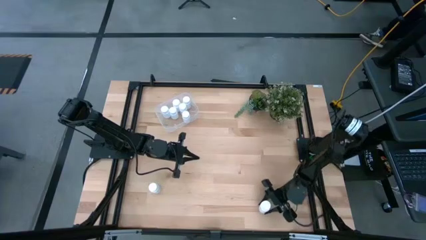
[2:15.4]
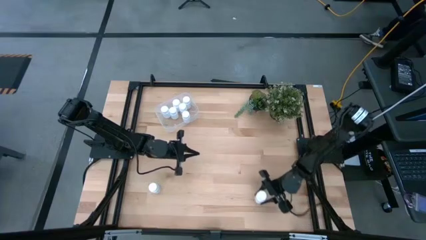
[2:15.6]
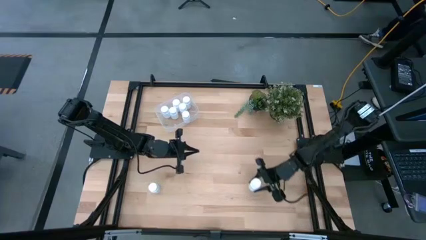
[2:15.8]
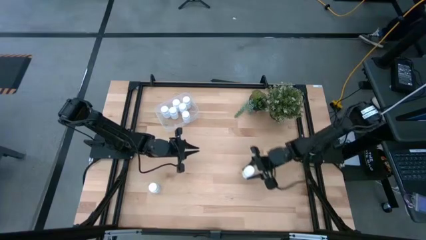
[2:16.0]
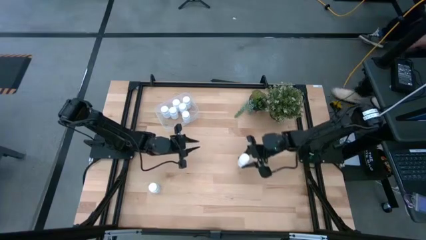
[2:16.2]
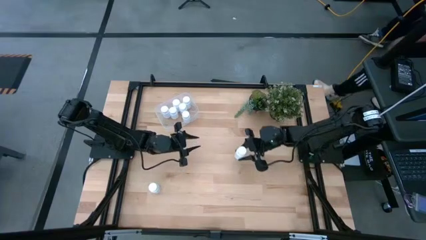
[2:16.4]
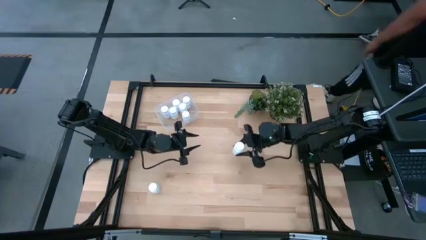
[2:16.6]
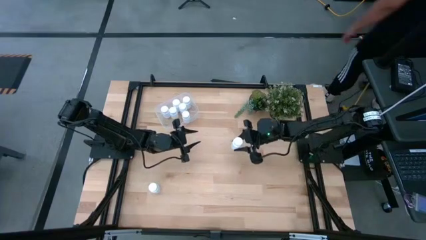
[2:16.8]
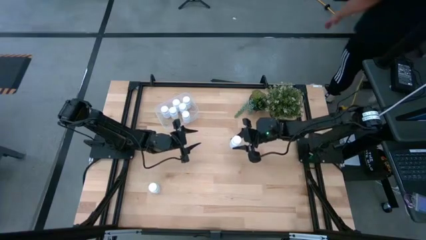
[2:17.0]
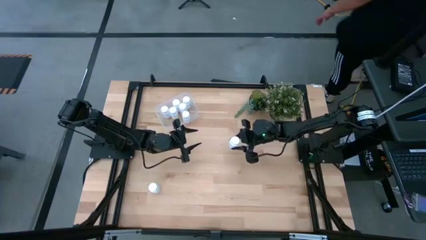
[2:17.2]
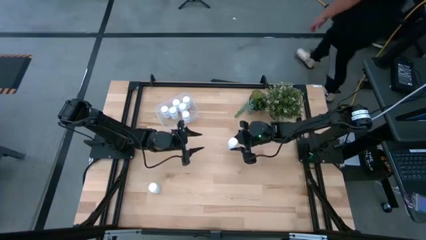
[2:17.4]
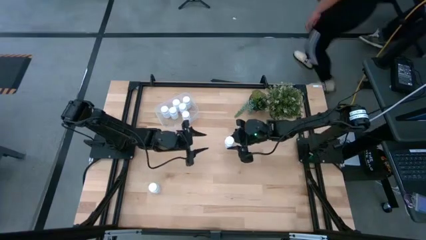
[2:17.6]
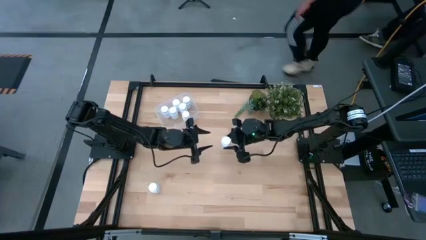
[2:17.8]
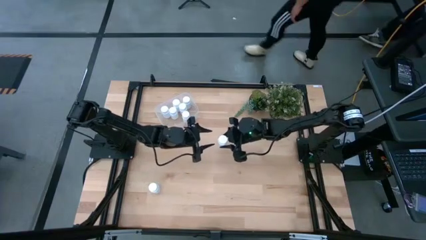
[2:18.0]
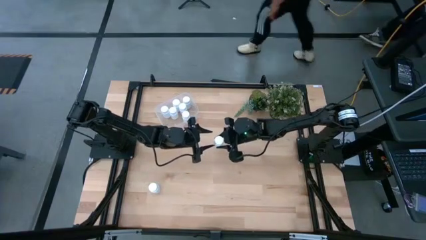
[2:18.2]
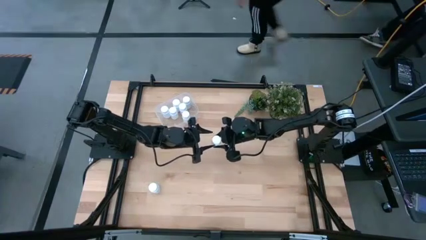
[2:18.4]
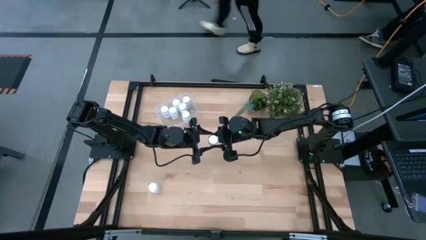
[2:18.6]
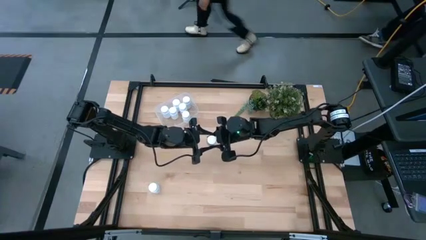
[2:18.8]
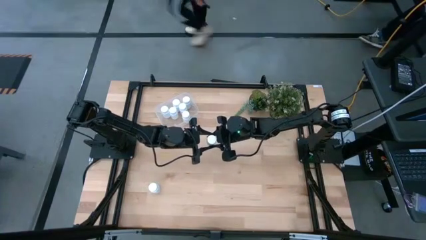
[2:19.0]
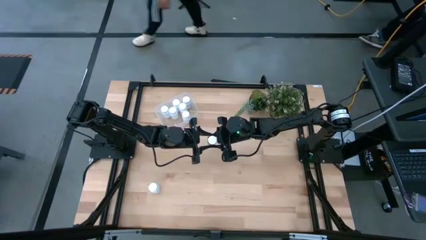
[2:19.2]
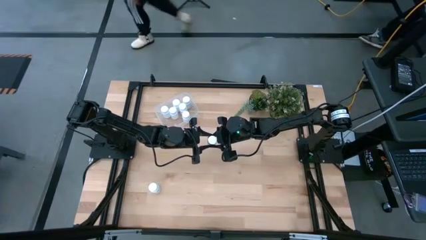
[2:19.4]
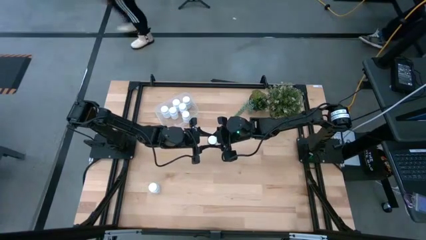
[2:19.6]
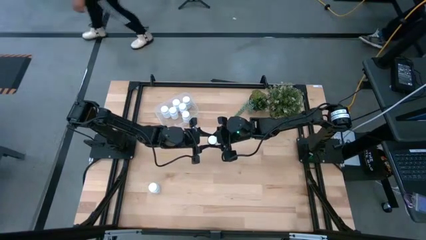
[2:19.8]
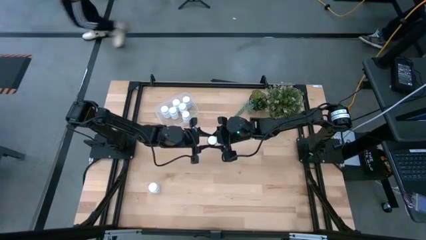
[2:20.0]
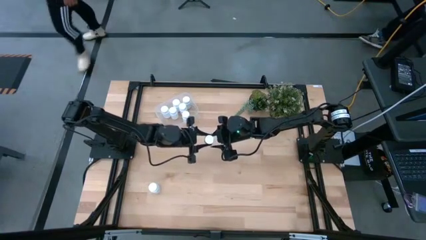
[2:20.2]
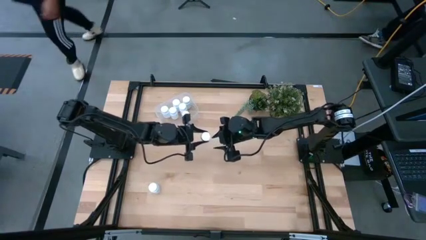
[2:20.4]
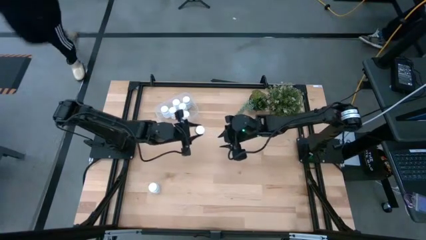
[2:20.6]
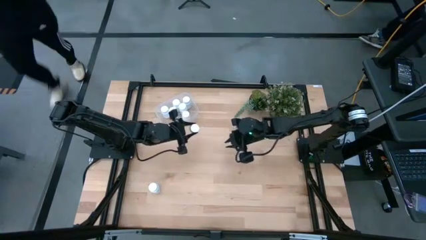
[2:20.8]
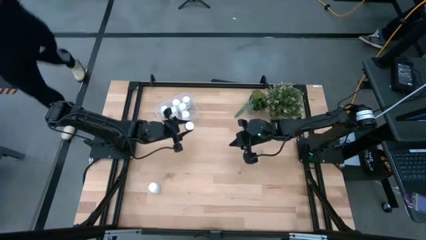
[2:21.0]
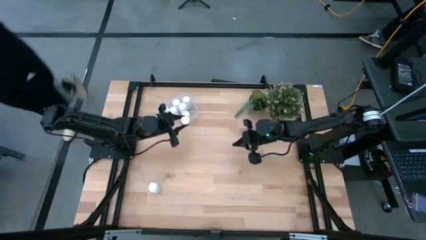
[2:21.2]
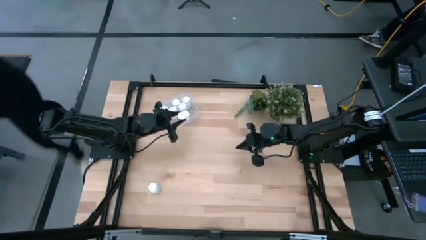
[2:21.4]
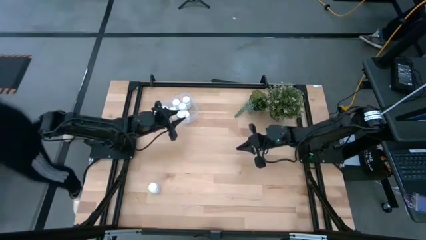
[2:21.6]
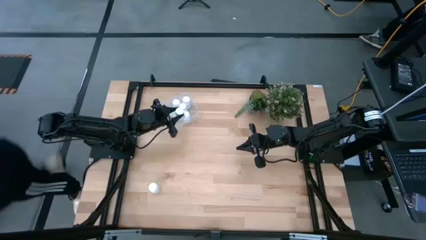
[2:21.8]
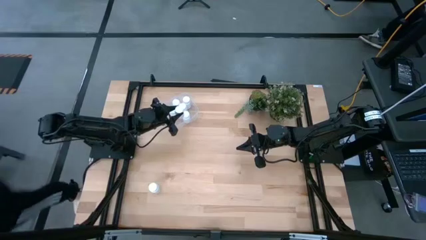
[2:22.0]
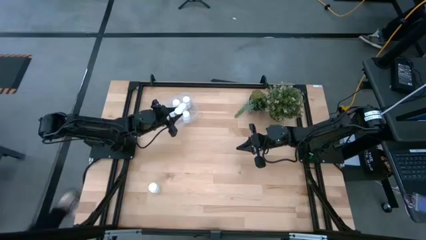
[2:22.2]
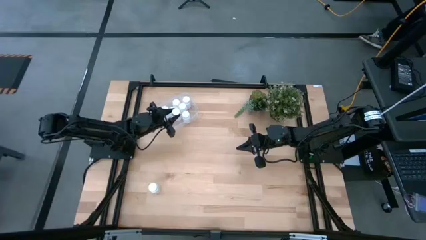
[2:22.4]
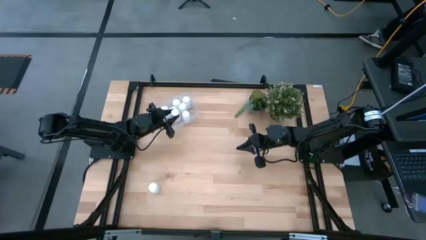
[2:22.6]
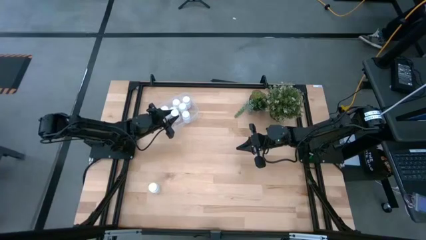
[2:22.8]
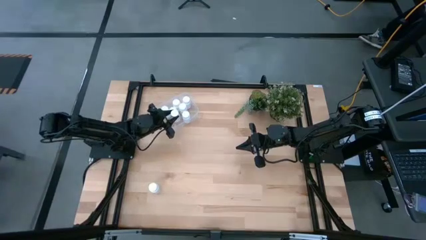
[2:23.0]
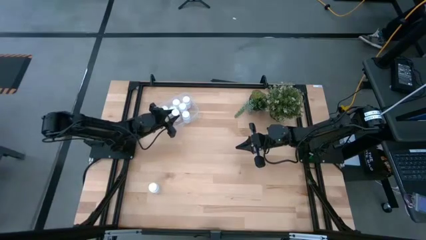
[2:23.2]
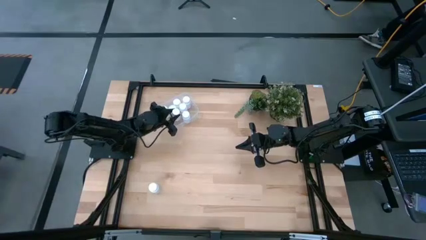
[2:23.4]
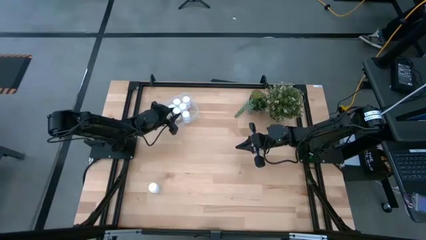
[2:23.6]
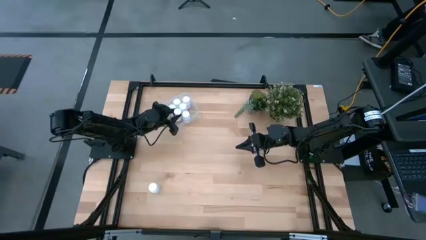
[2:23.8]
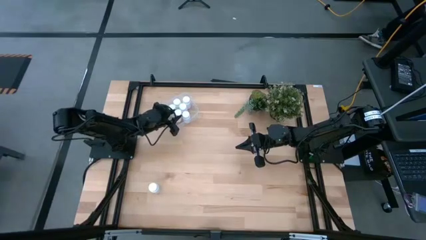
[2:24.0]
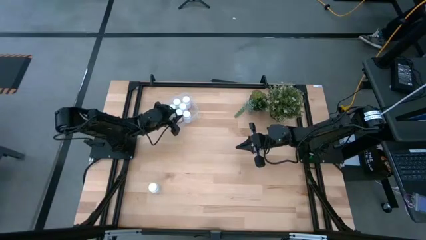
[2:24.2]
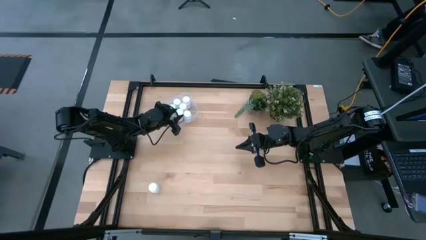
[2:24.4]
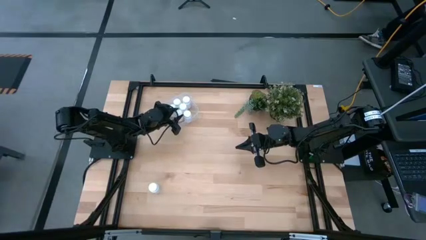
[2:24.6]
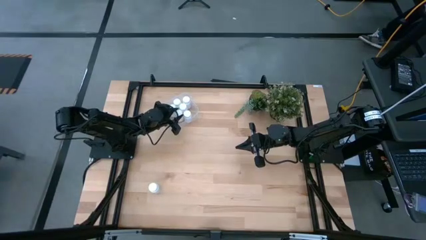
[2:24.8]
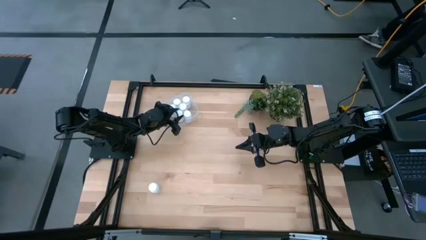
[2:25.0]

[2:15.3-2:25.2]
Task: Pick and place pill bottles into a basket
Put the white medicine bottle into the transparent bin
